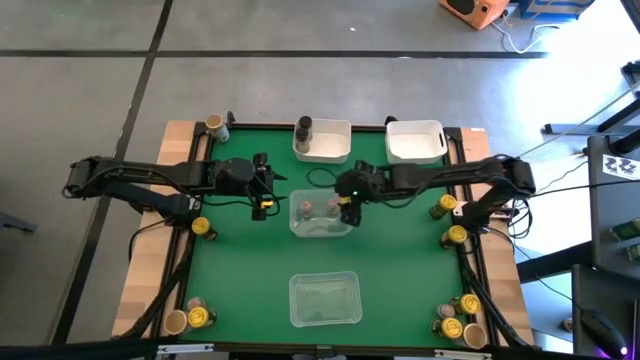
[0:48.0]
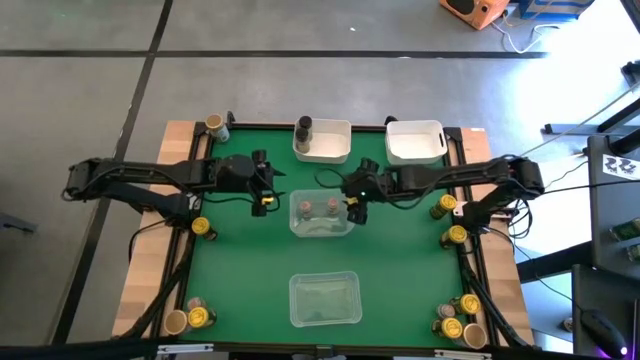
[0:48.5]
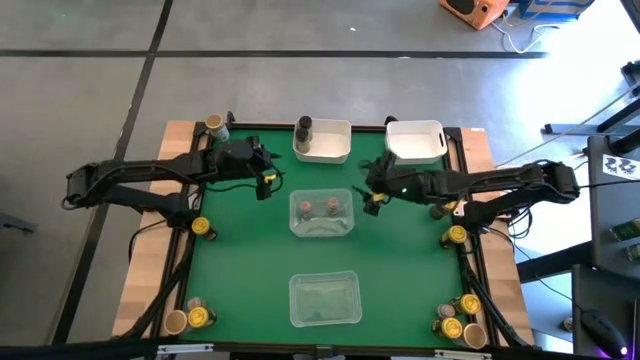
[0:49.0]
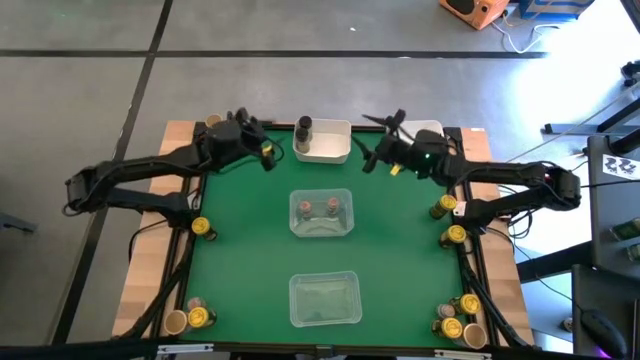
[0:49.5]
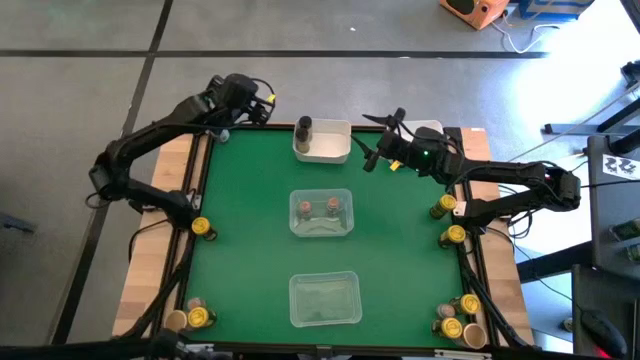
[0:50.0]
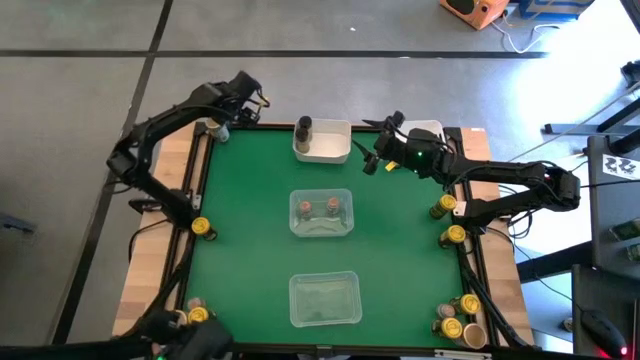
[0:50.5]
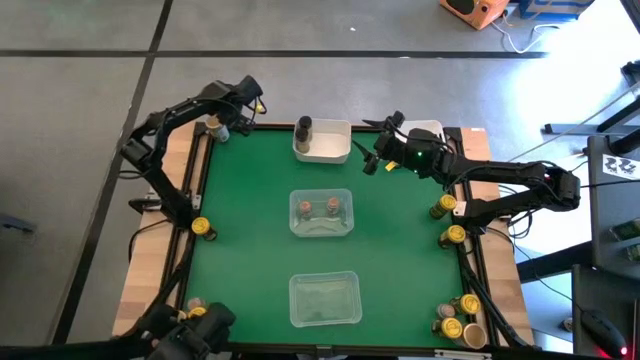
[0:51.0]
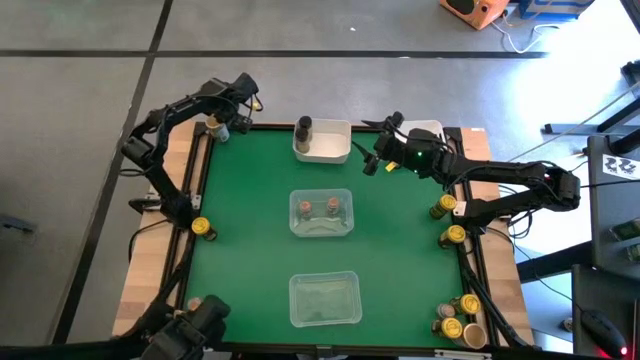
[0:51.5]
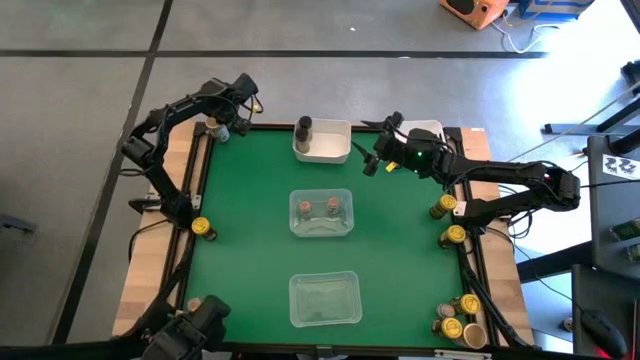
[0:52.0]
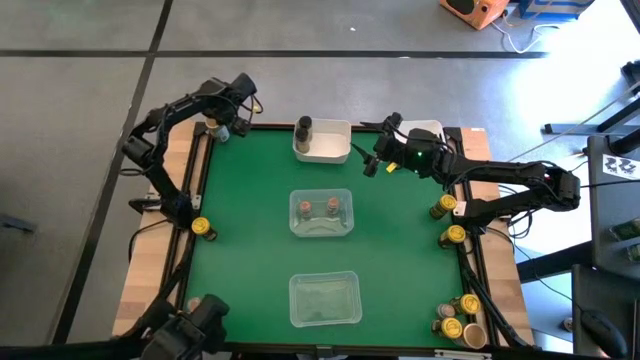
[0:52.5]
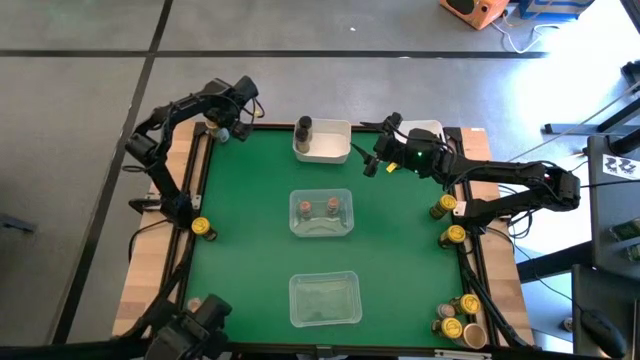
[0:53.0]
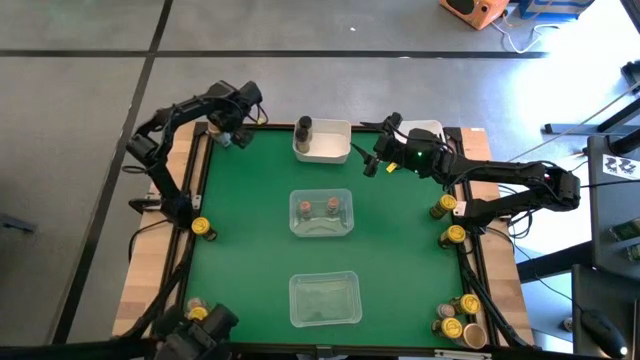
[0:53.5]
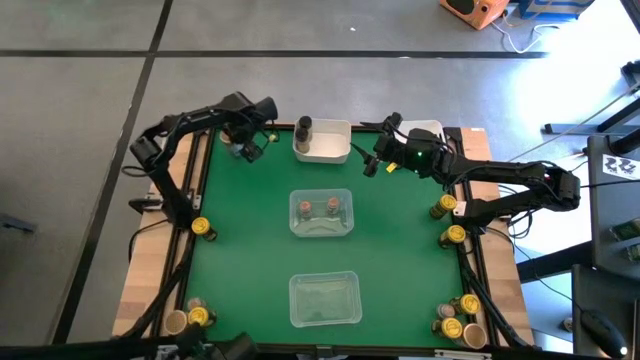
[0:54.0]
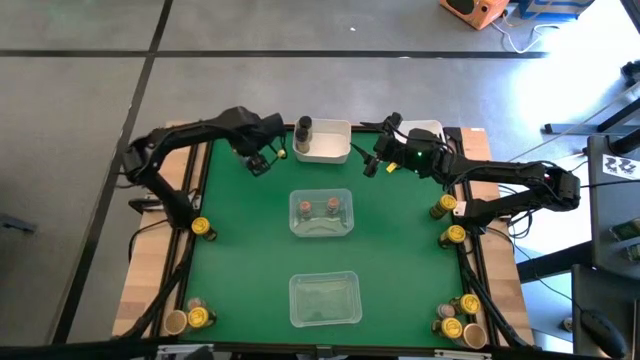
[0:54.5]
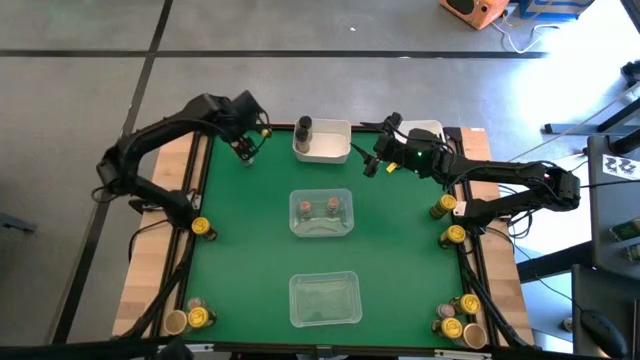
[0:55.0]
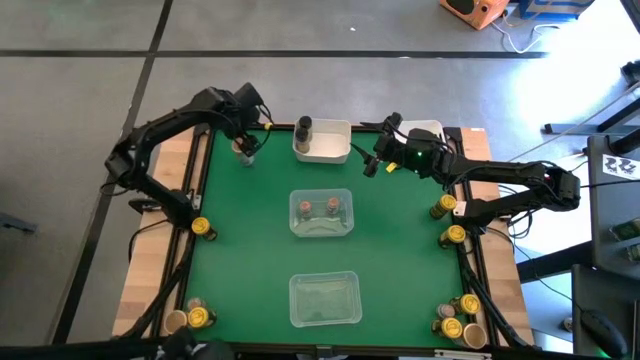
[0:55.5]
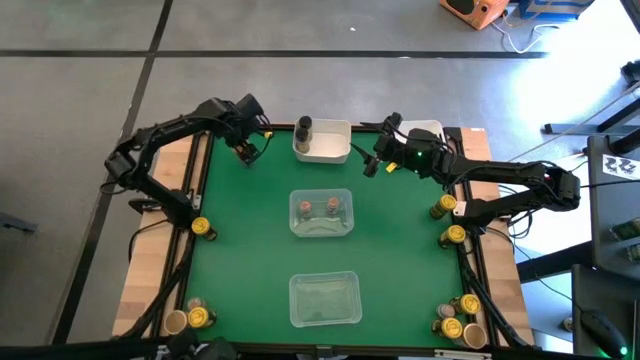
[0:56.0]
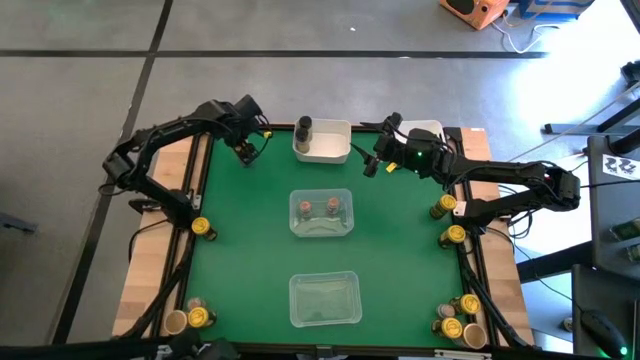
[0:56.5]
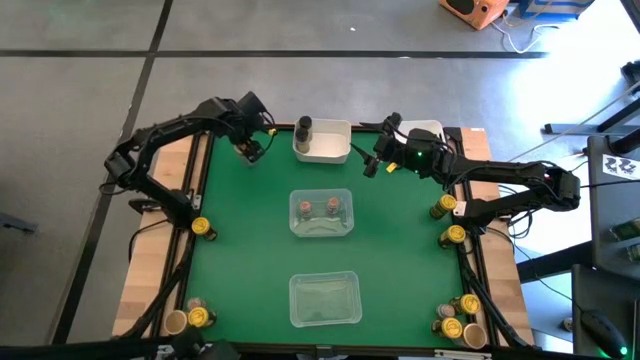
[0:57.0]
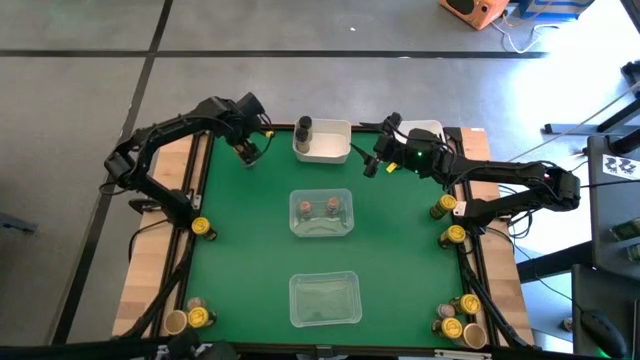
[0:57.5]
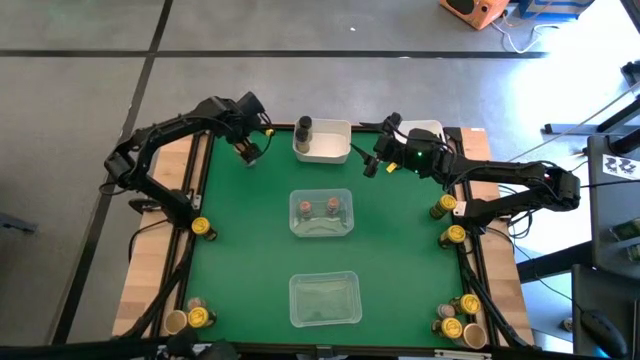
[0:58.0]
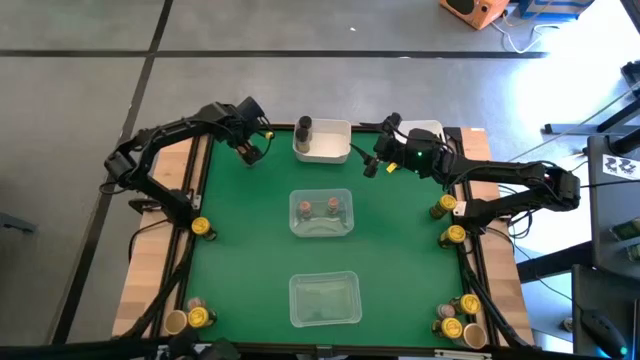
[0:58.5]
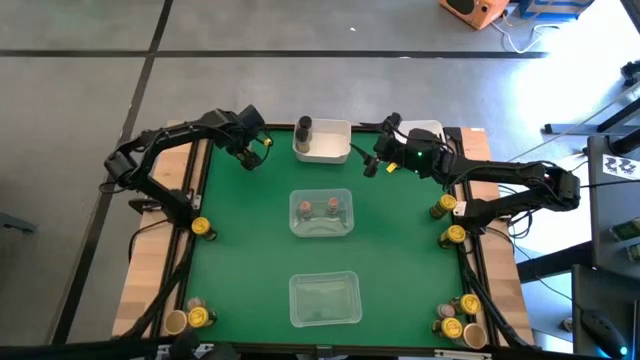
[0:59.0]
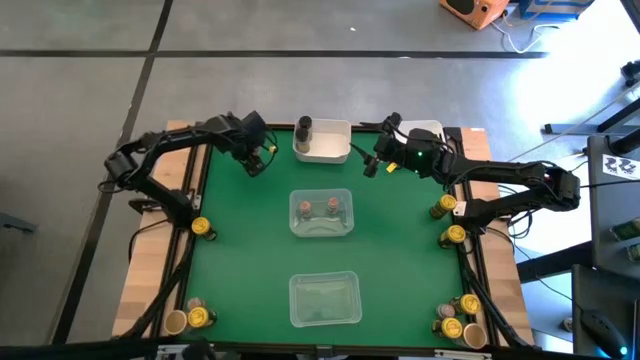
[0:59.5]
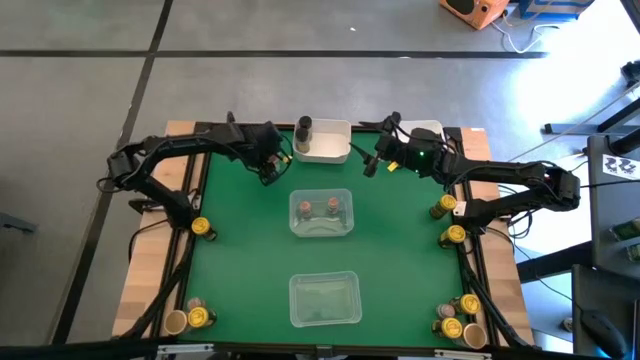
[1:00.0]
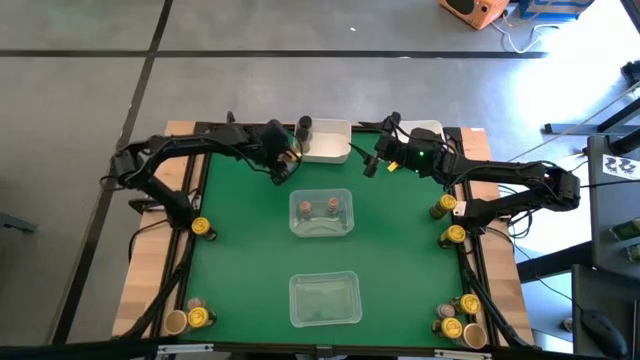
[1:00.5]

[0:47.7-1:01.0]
Task: Sort spices by type
Put the top left brown seasoning bottle into the top right white bin

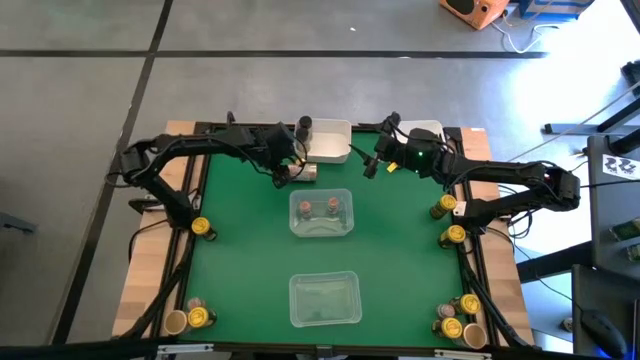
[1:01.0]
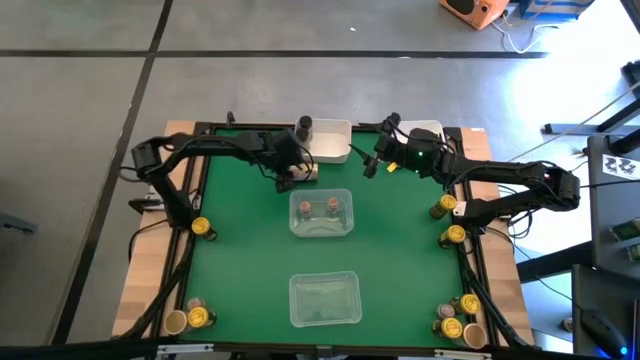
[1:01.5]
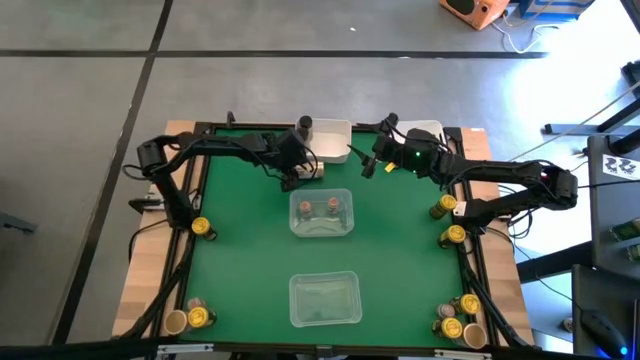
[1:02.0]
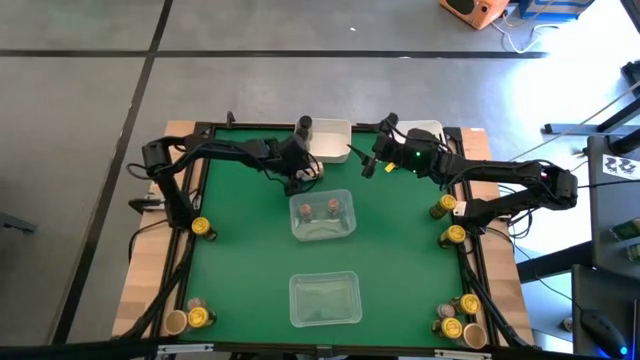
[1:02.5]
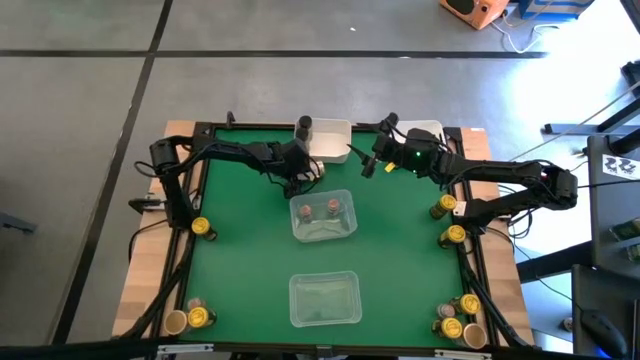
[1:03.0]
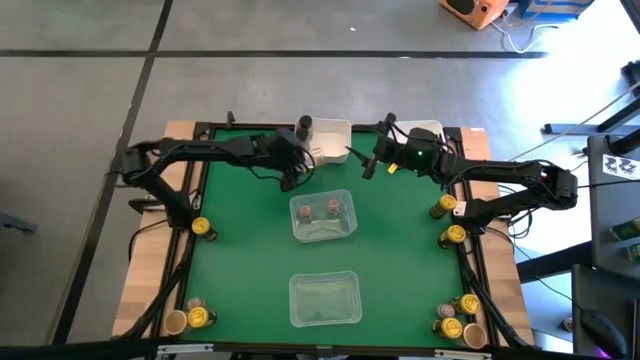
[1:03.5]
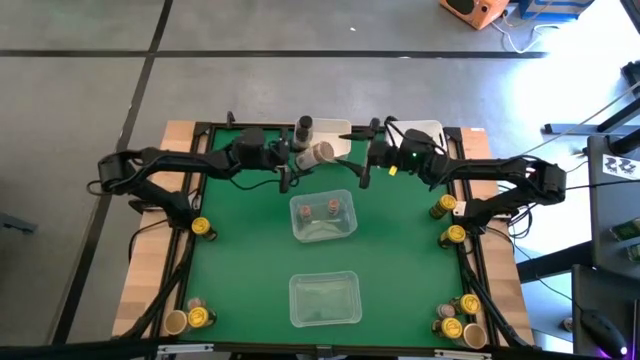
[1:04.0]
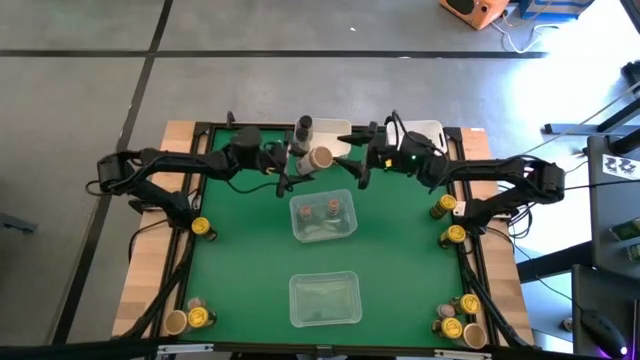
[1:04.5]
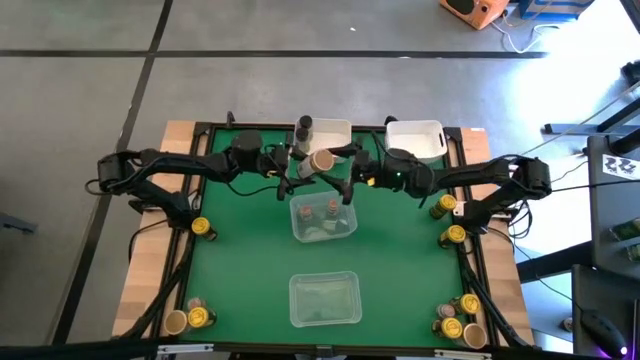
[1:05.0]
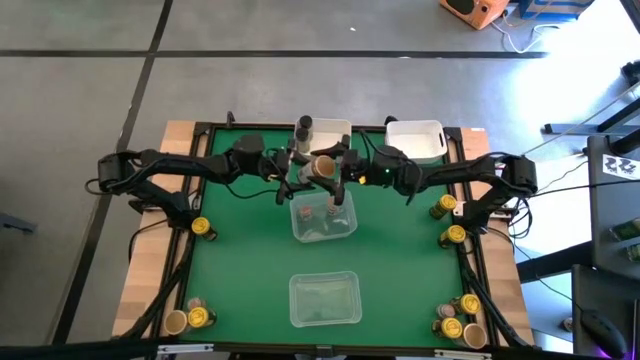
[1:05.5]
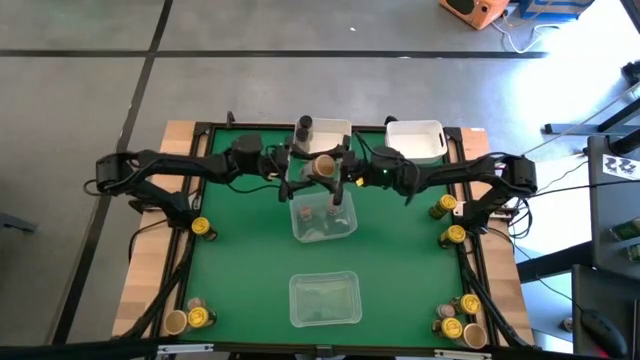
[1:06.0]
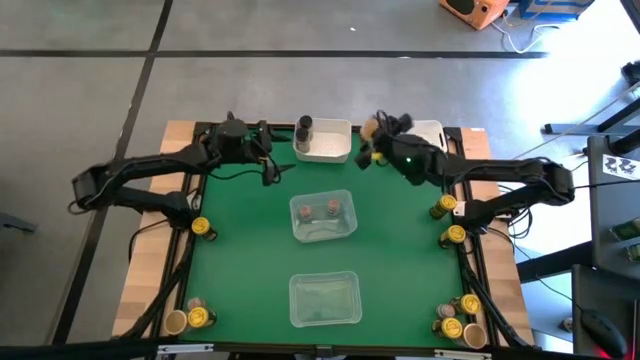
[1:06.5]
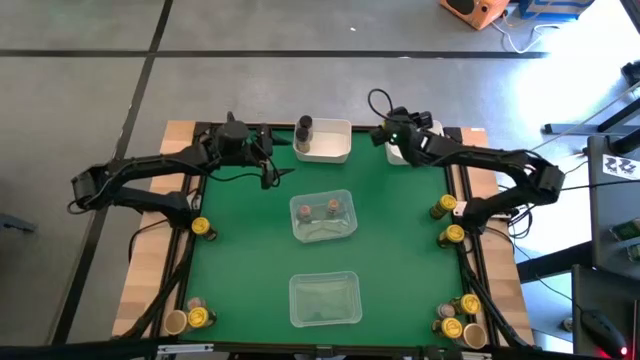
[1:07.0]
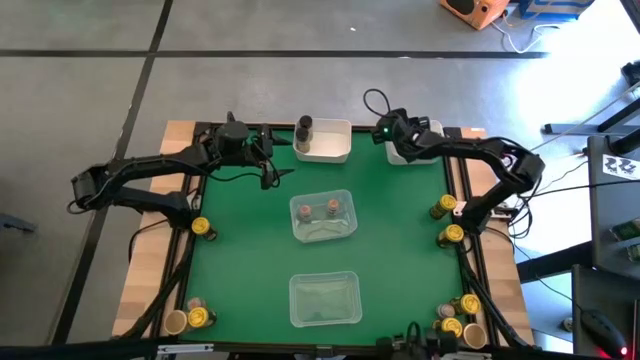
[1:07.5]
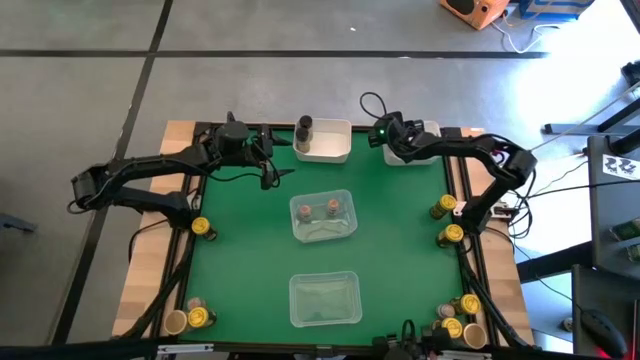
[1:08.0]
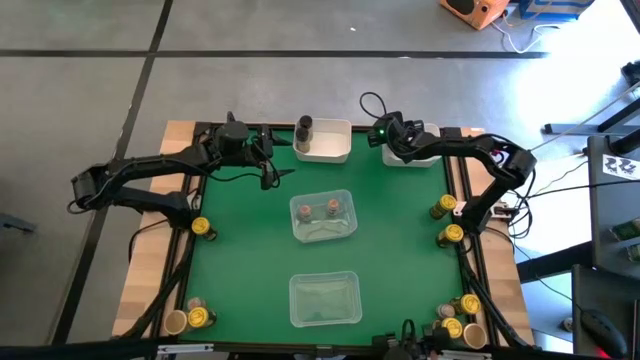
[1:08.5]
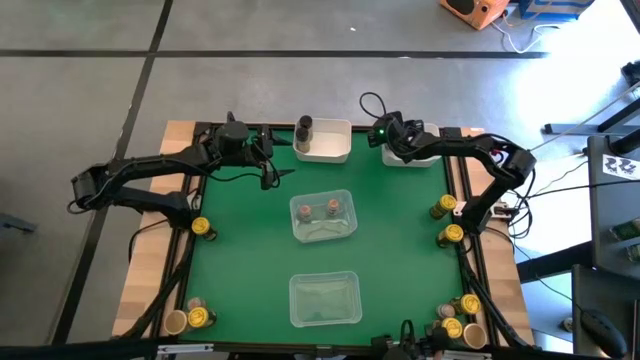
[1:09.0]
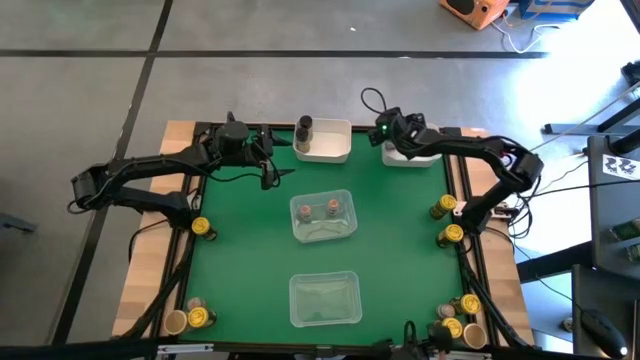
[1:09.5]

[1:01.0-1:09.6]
Put the top left brown seasoning bottle into the top right white bin

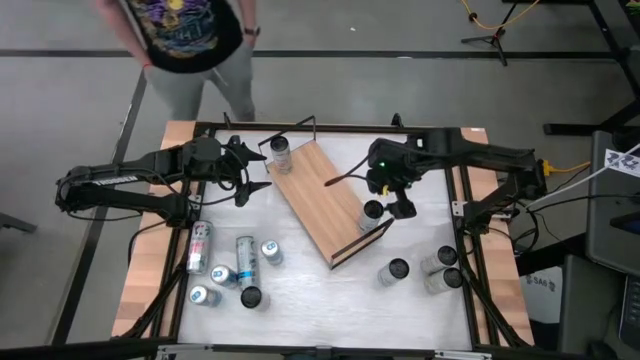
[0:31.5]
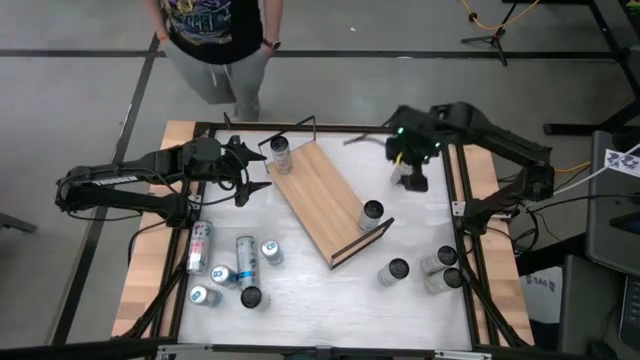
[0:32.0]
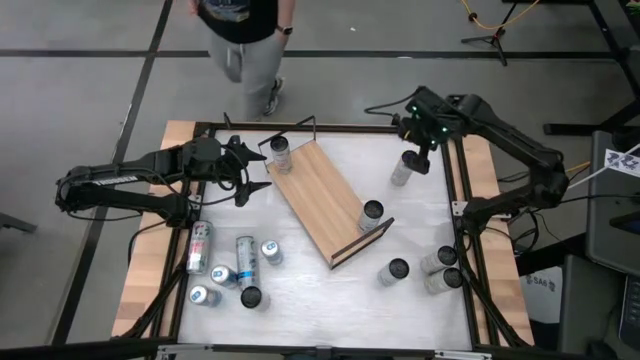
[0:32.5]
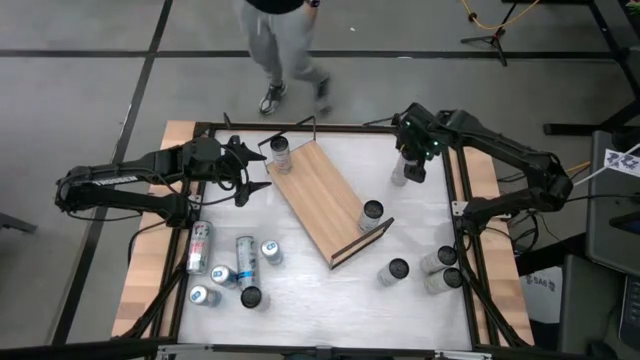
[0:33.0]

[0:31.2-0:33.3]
Task: Place canned beverage on shelf
Put the top white-orange soda can on the shelf
